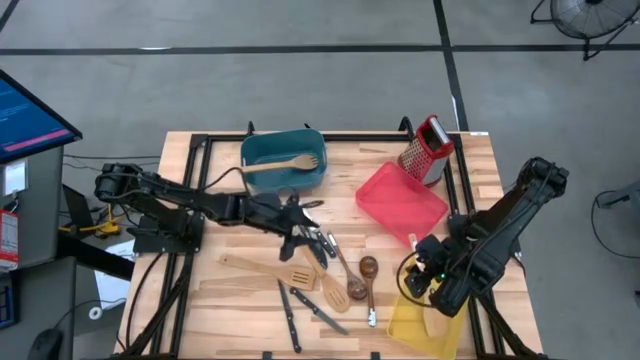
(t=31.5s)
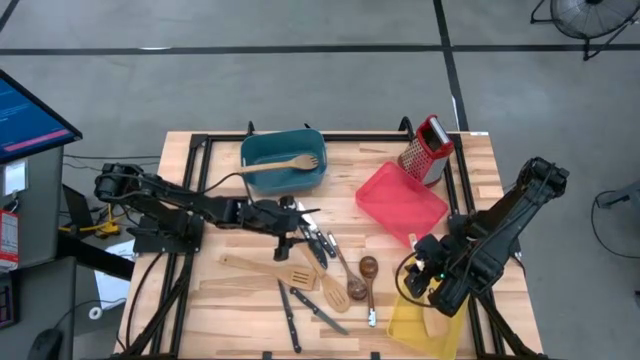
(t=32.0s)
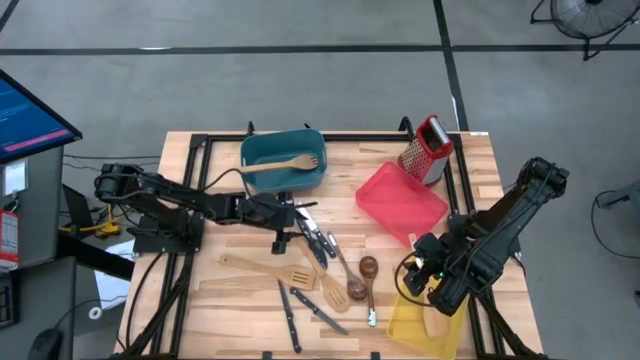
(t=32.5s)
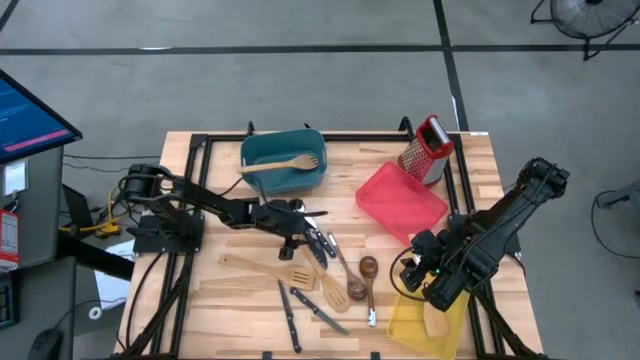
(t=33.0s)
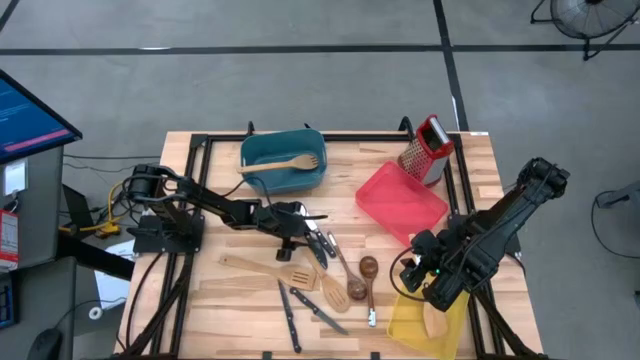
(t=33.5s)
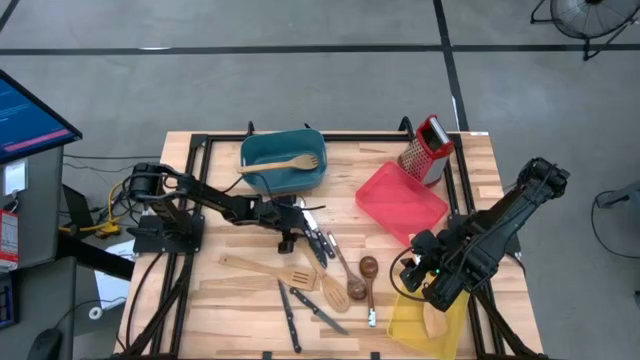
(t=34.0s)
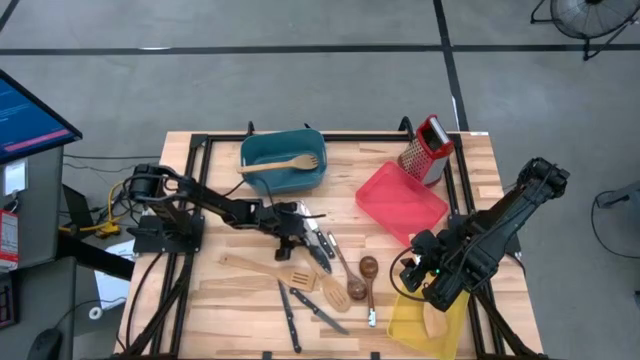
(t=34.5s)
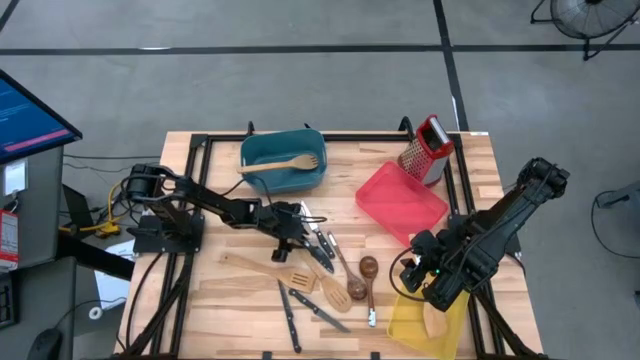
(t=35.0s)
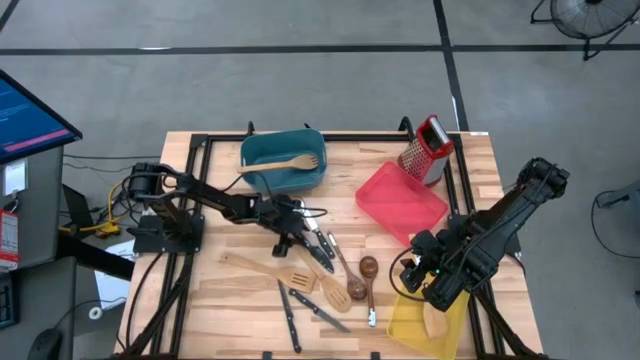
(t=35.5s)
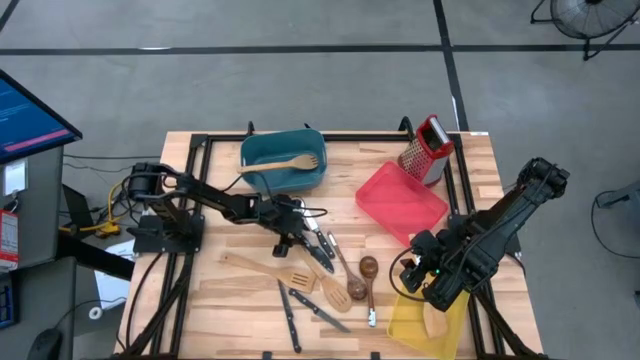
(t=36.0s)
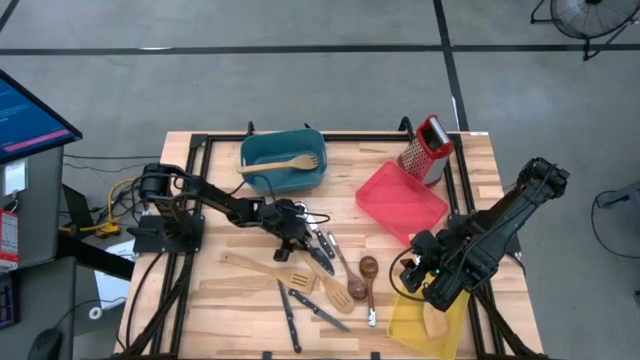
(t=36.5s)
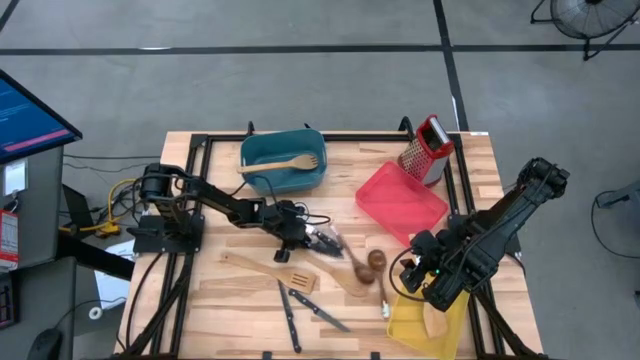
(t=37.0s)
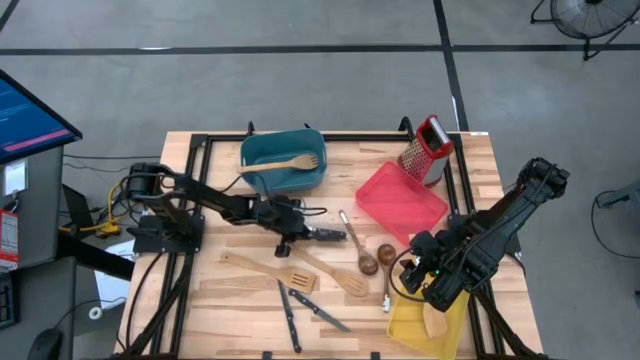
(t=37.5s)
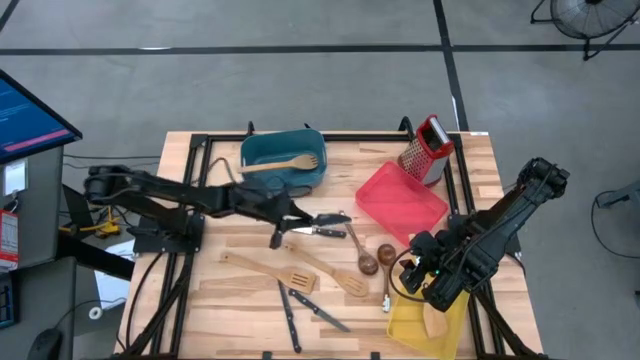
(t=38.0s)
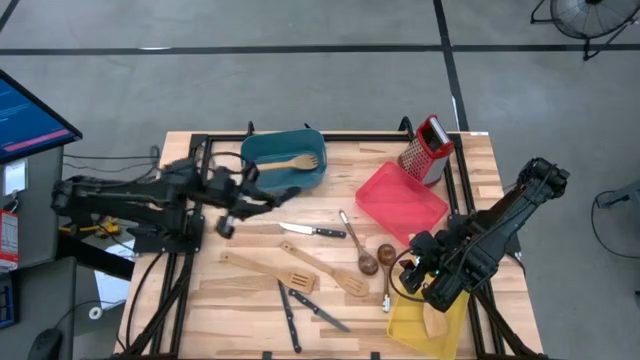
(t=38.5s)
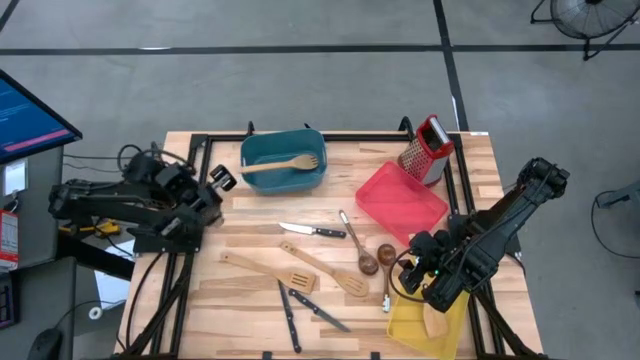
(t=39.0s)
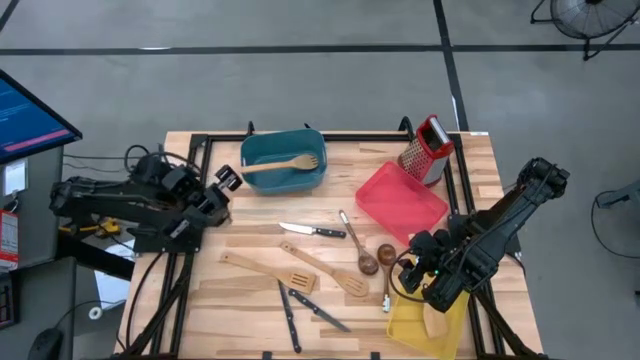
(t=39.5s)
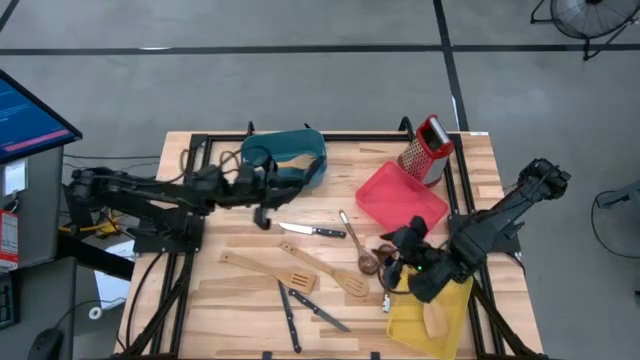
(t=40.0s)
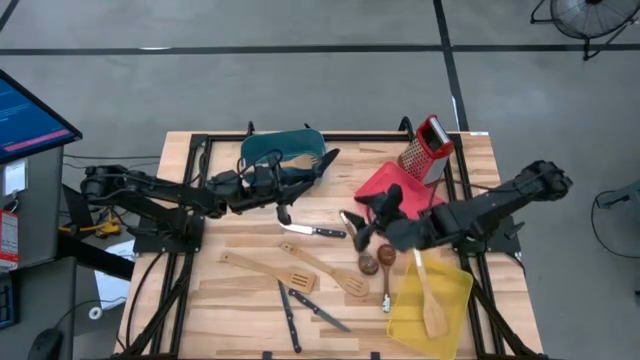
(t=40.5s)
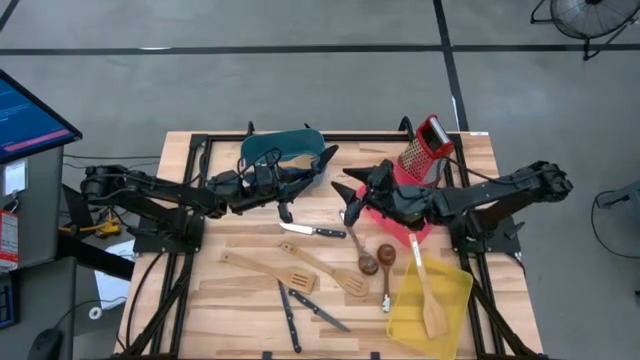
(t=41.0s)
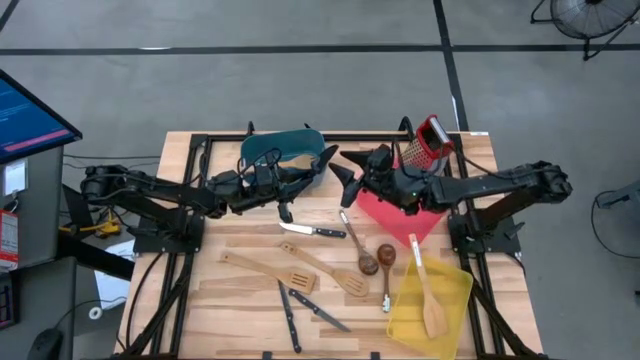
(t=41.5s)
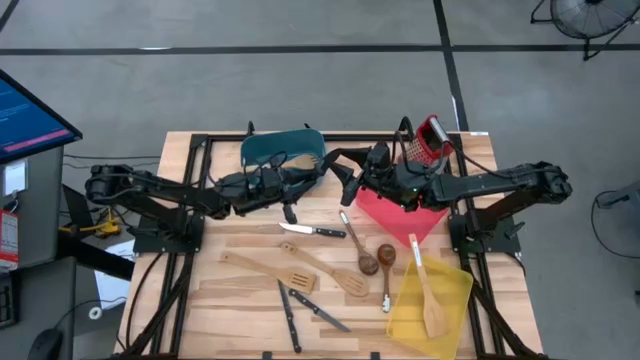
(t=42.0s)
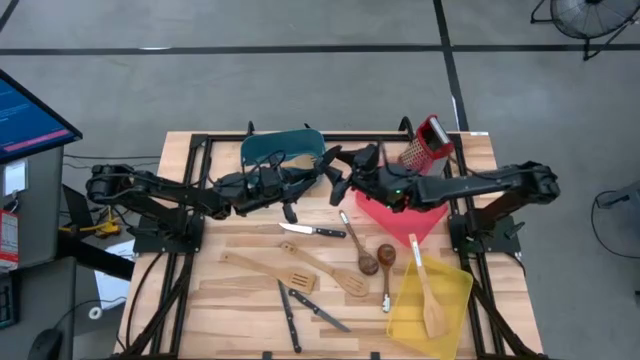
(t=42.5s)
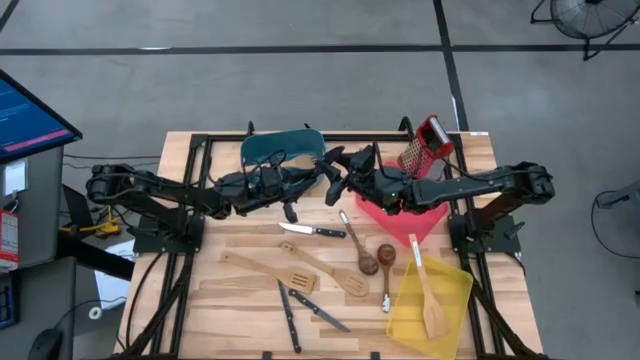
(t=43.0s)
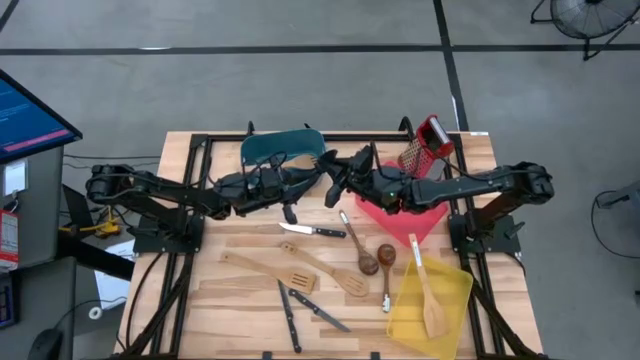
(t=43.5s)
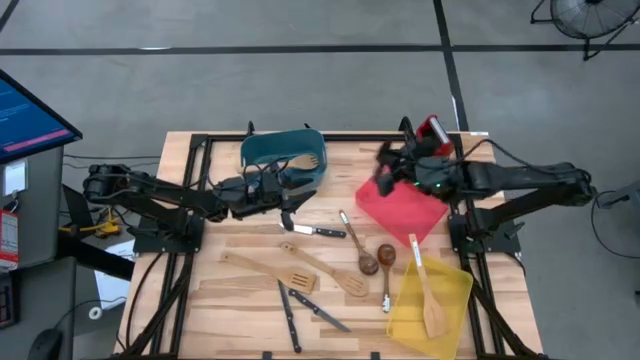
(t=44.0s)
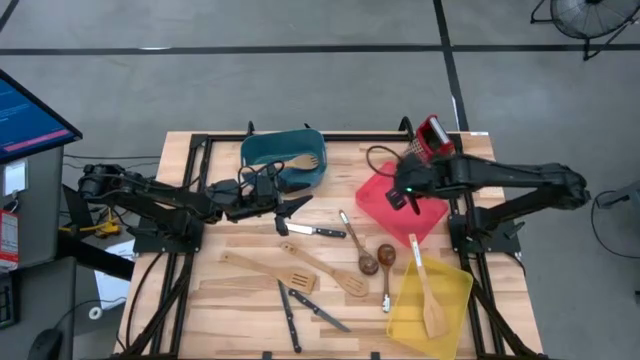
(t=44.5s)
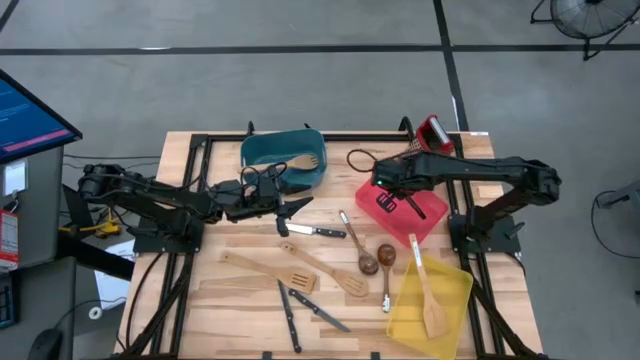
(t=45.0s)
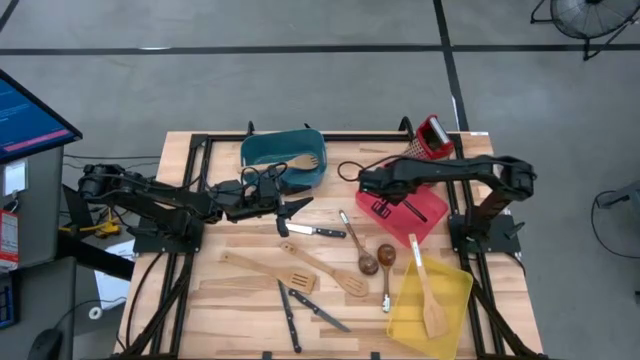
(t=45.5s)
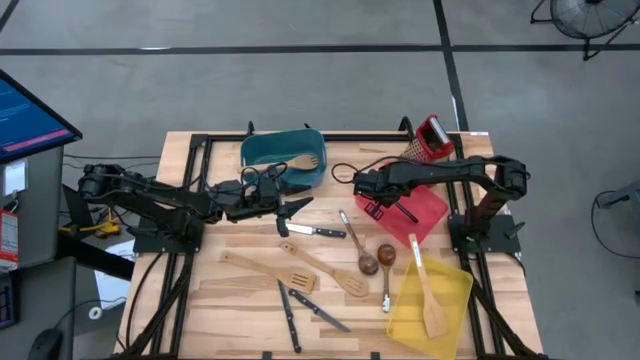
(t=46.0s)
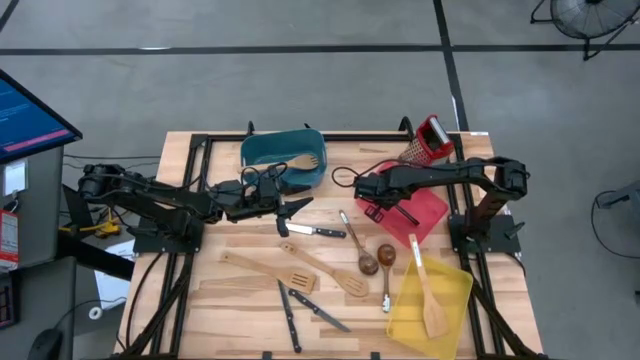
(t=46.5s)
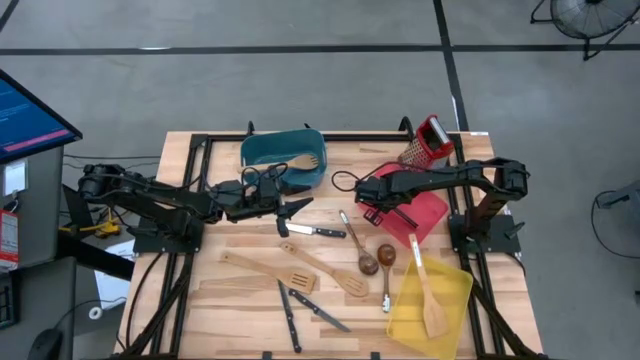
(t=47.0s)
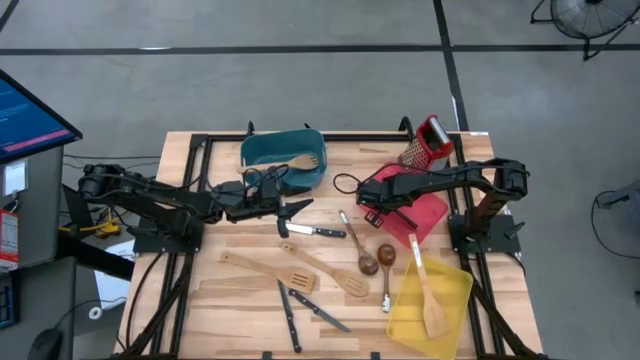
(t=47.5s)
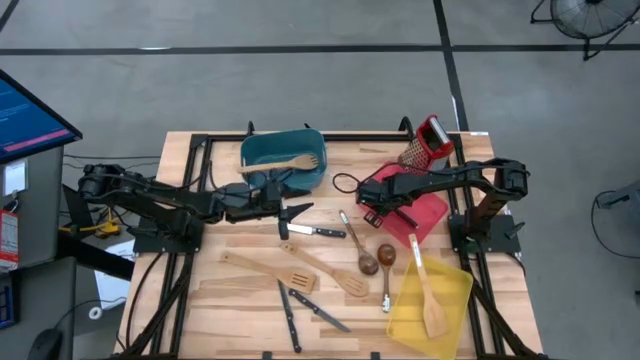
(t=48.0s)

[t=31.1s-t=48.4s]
Task: Pick & Place Kitchen Items
Put the black kitchen knife into the red bin
